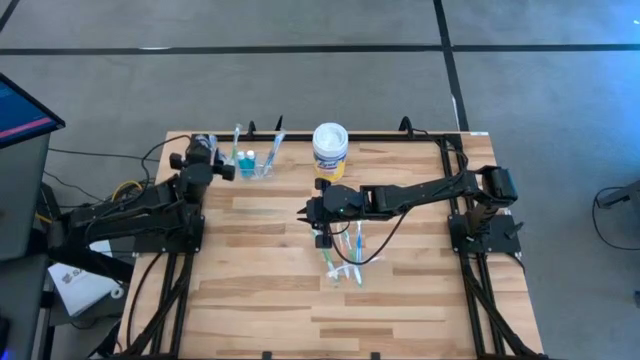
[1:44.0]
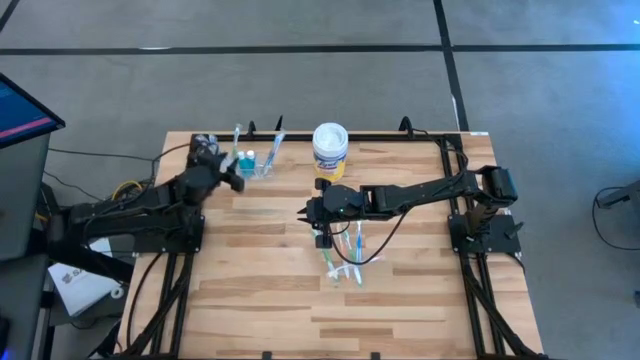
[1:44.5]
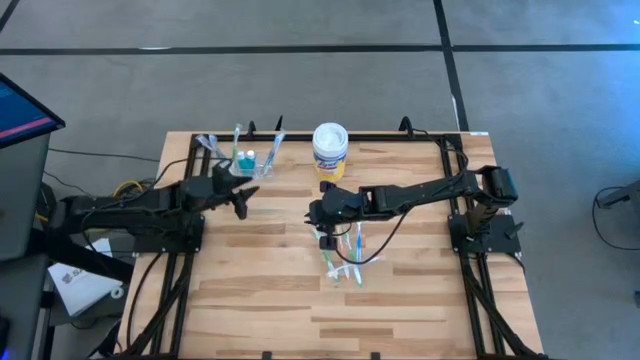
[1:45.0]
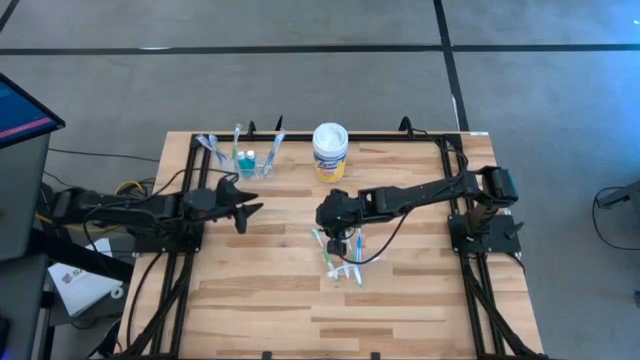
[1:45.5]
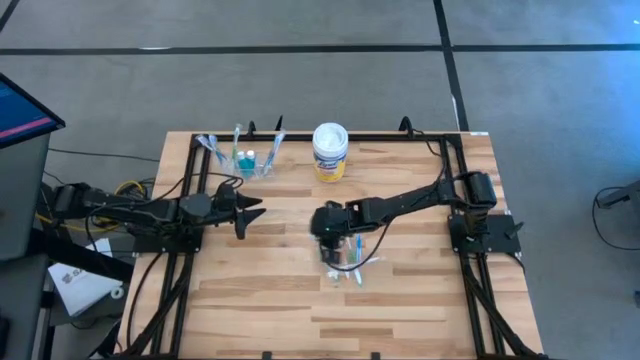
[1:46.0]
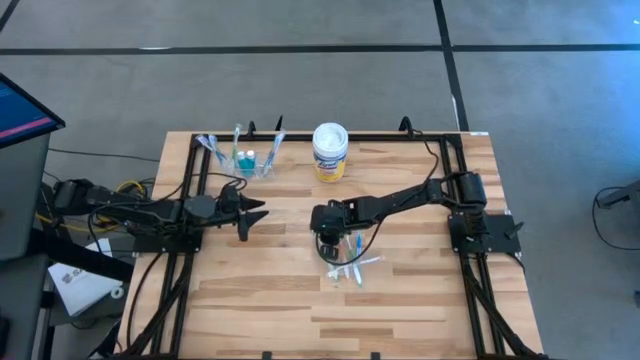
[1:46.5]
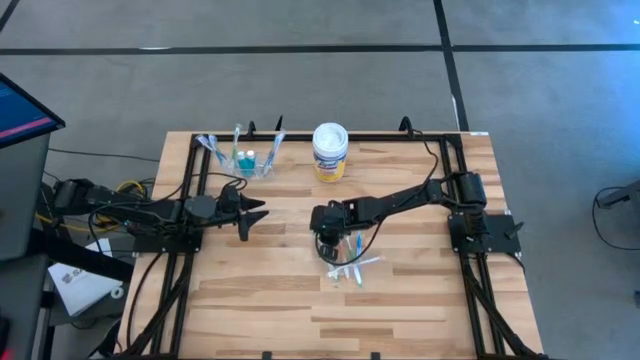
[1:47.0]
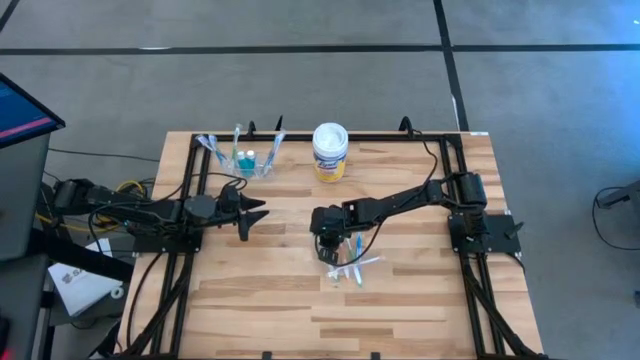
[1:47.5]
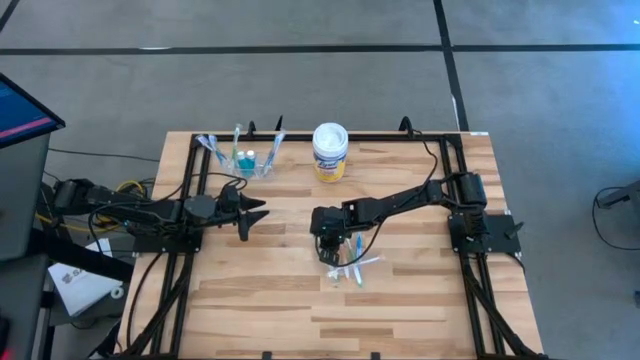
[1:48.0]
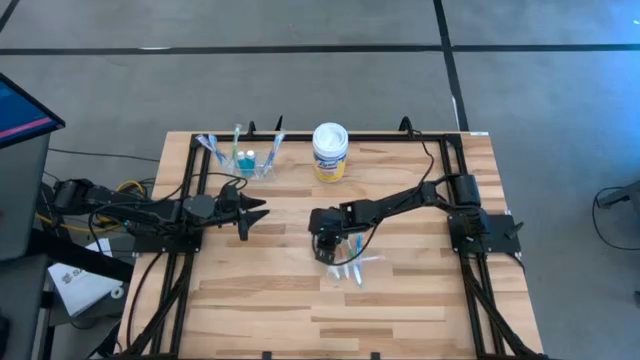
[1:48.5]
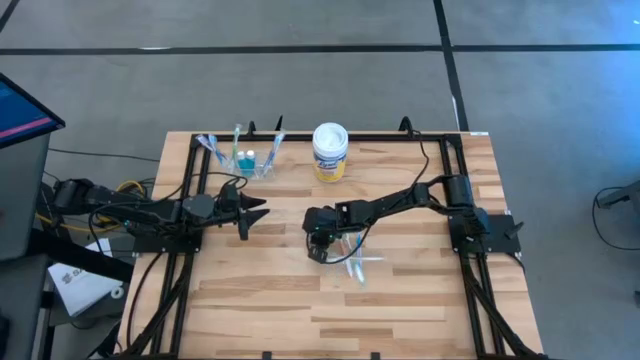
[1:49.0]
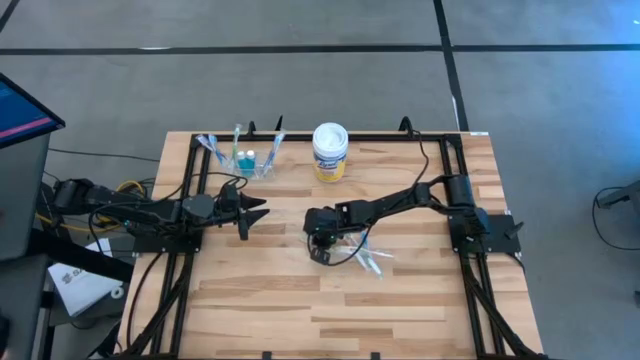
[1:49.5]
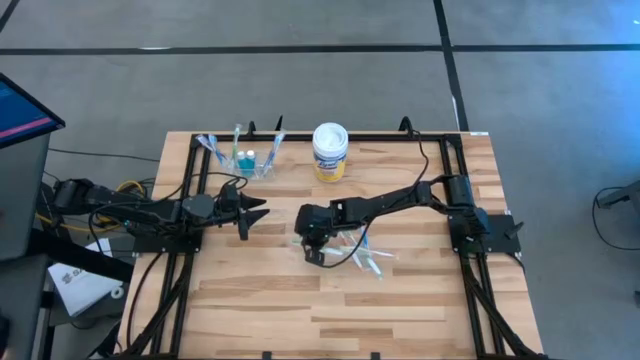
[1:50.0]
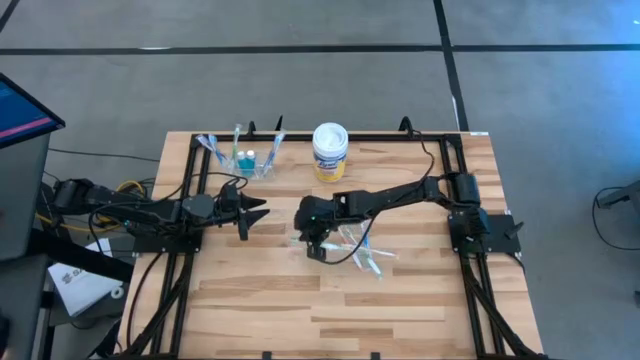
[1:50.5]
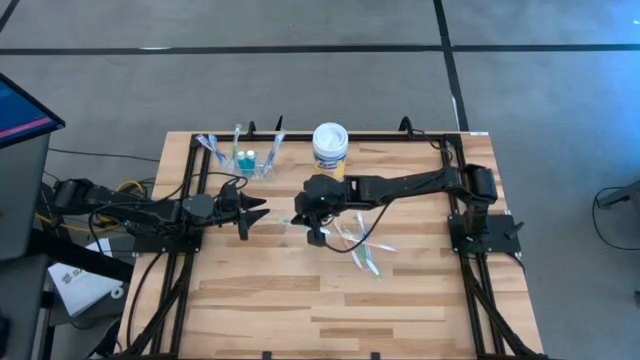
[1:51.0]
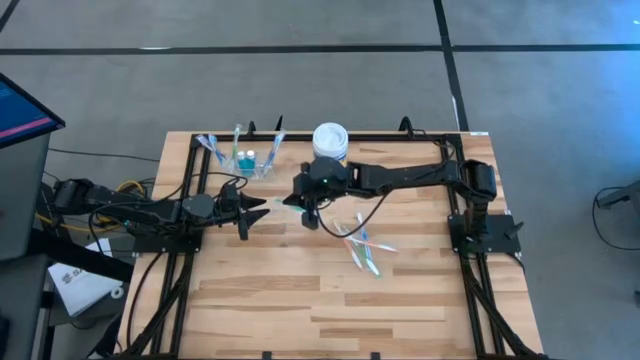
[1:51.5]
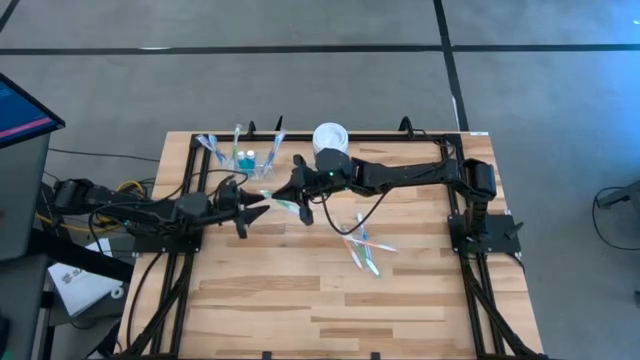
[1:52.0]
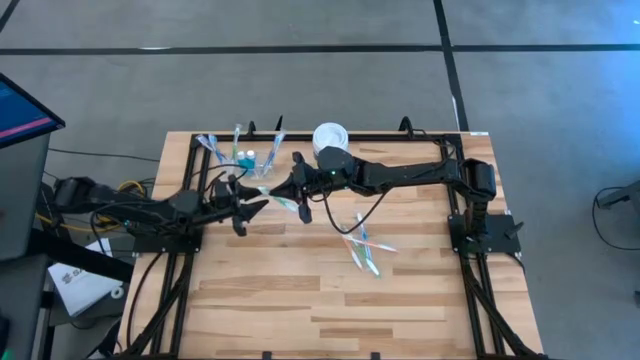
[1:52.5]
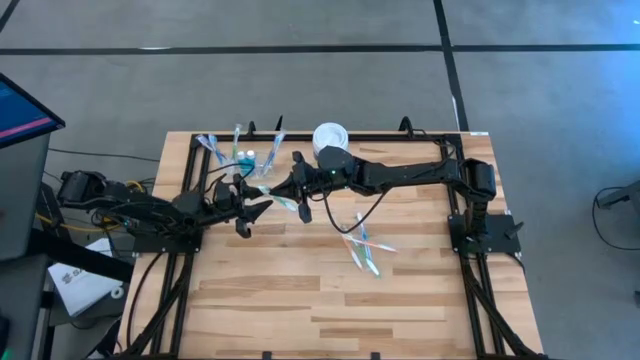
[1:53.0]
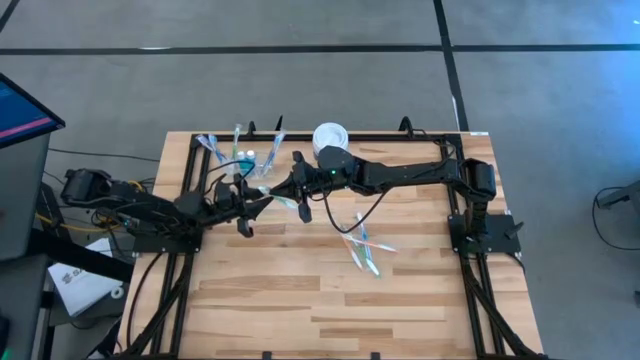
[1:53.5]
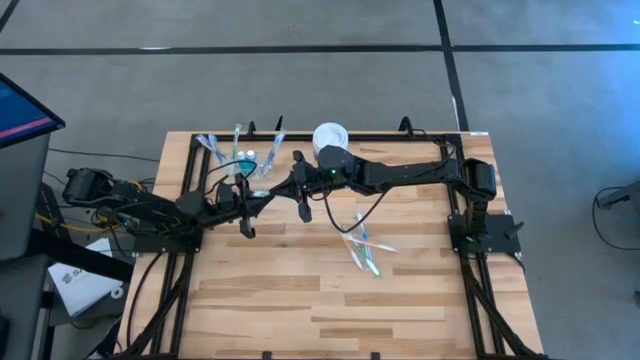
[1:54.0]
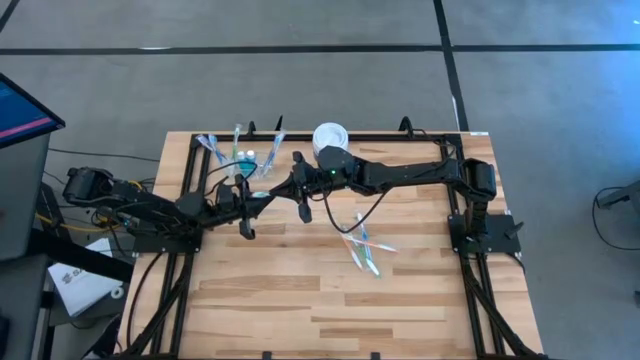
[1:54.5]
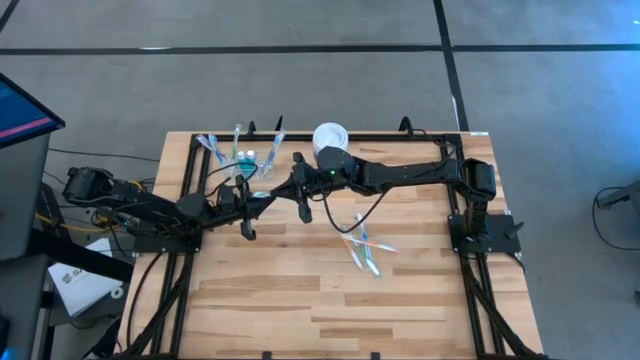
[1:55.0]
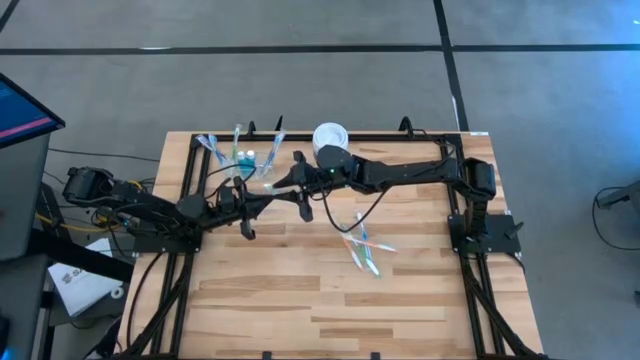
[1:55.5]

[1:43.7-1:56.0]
Task: Pick & Place toothbrushing station
Put the green toothbrush into the transparent organizer

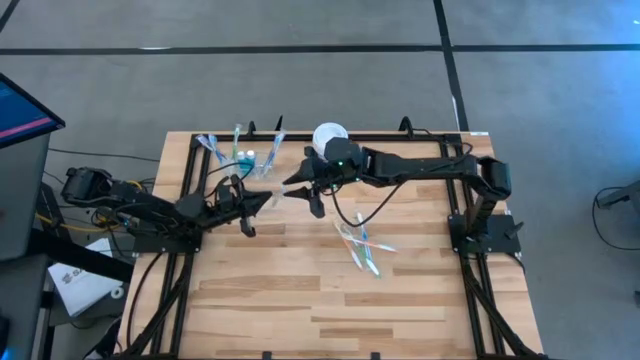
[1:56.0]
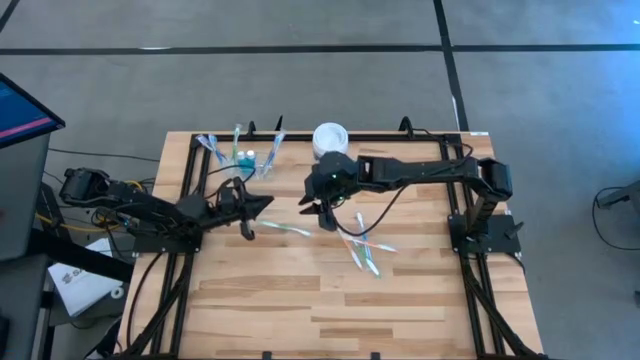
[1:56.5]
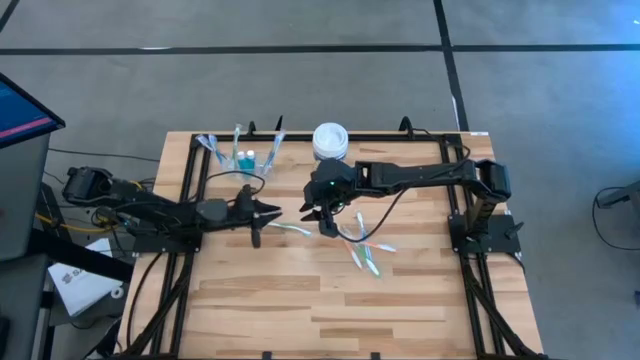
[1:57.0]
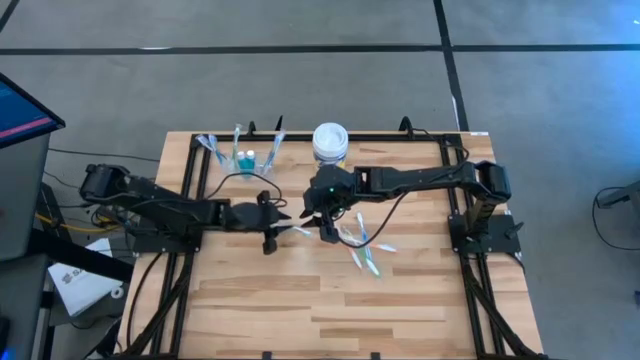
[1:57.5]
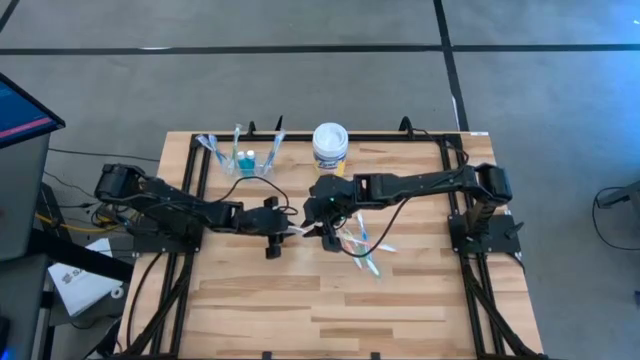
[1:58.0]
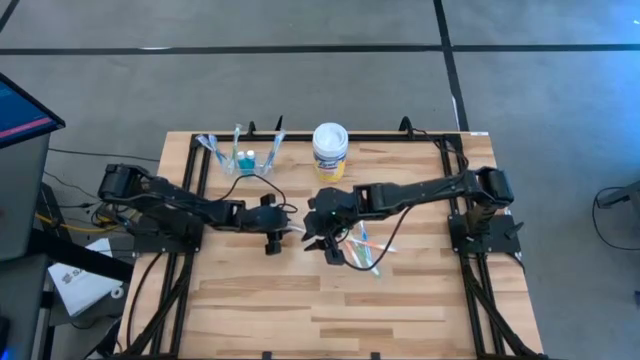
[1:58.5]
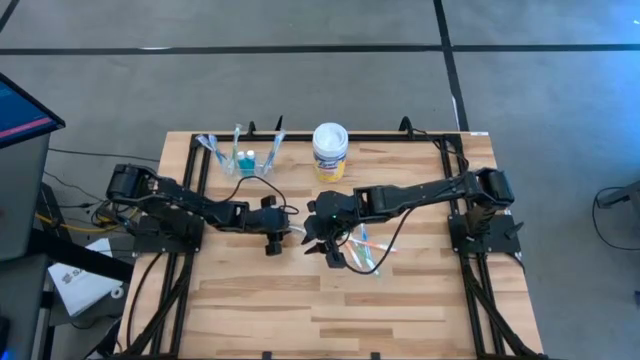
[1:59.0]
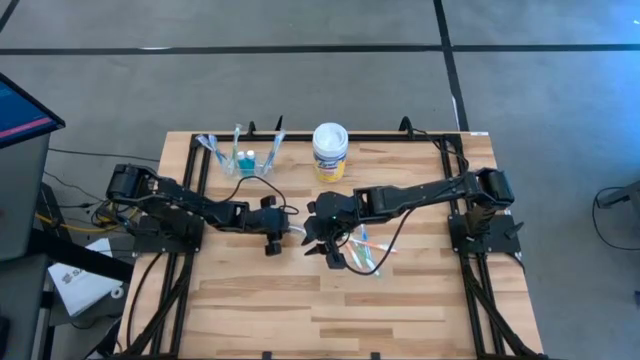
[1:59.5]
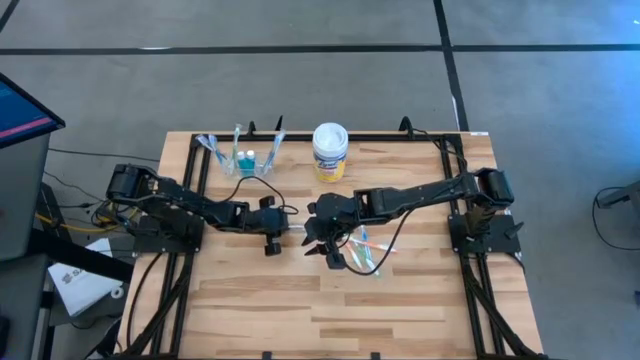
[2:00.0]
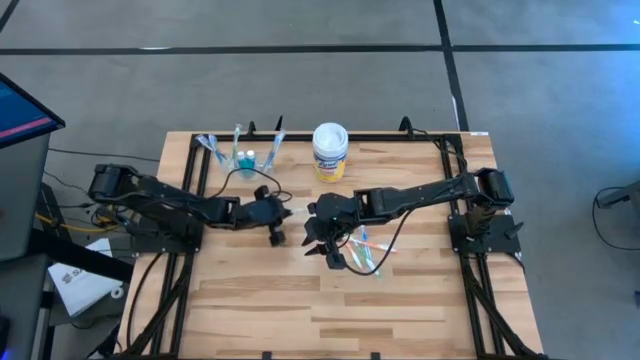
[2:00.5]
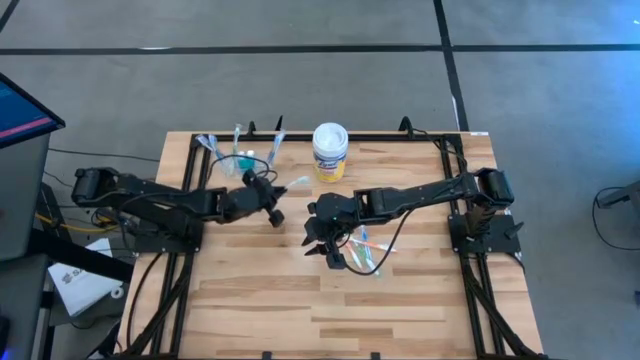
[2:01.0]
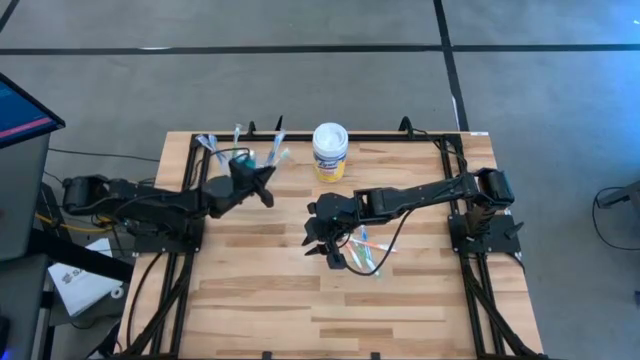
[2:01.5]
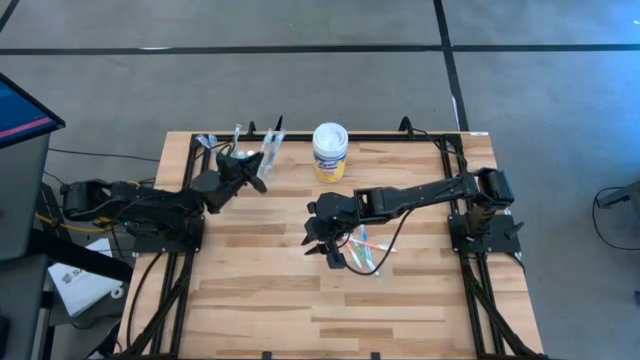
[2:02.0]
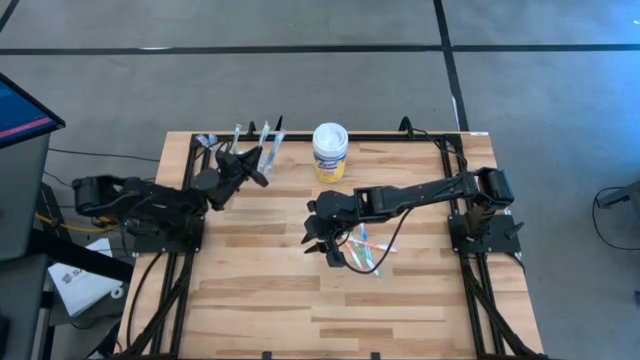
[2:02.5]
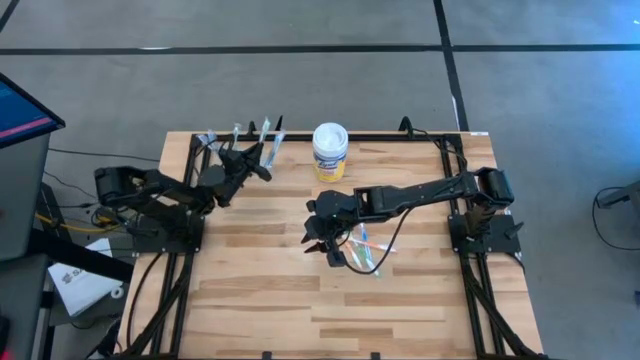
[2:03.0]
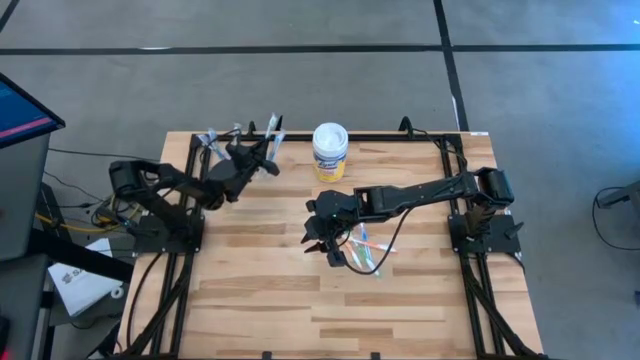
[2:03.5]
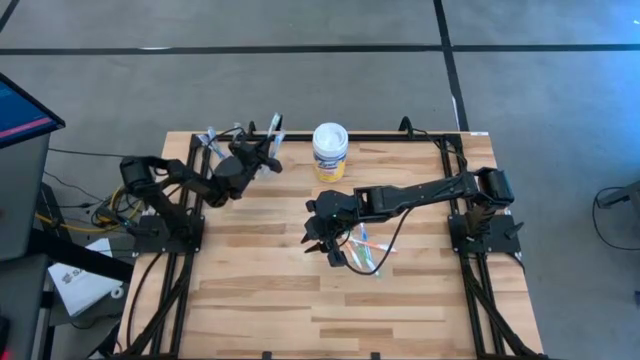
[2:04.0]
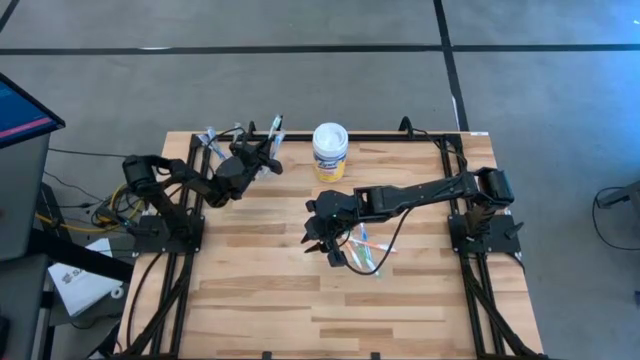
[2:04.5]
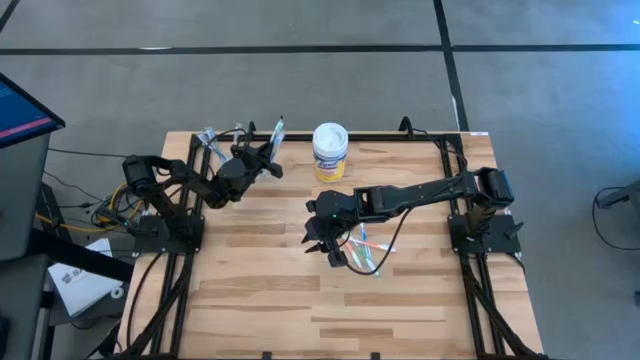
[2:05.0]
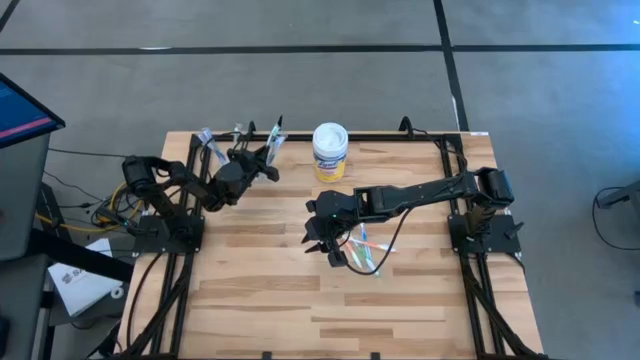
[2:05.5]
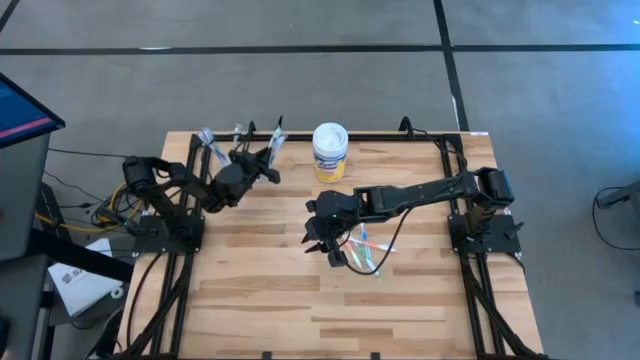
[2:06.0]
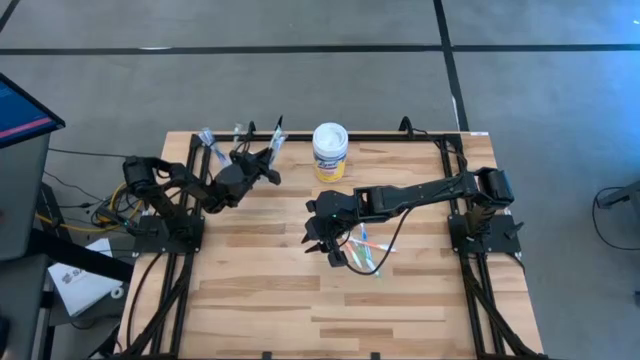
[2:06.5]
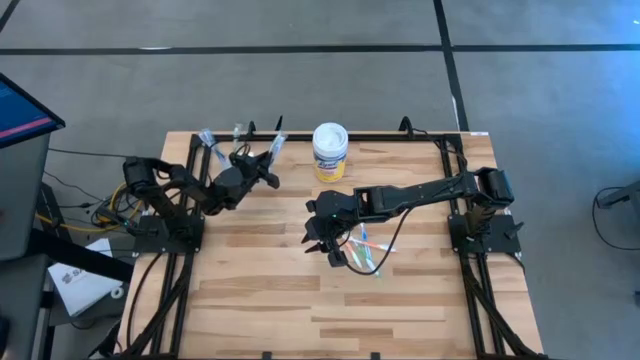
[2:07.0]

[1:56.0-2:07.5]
Put the green toothbrush into the transparent organizer
